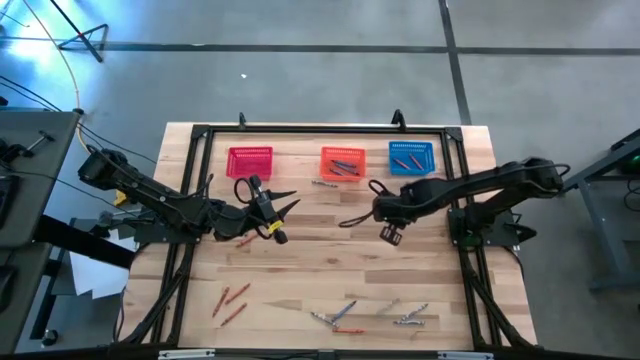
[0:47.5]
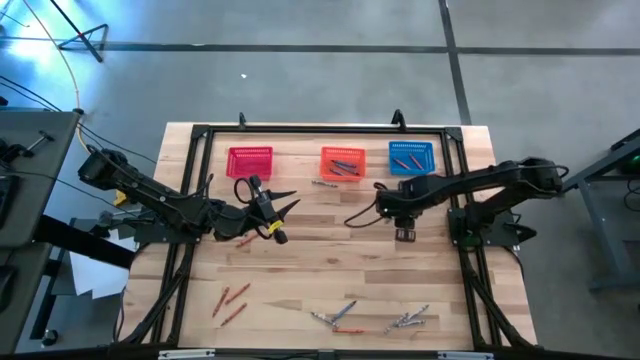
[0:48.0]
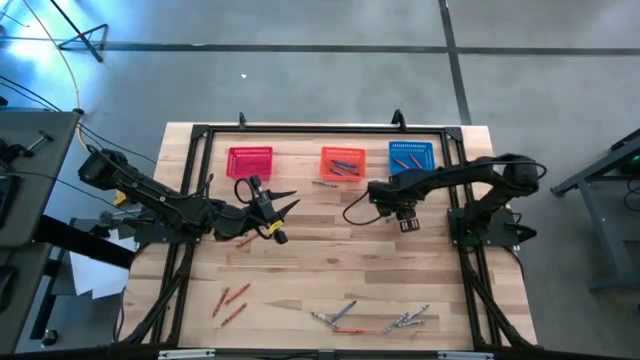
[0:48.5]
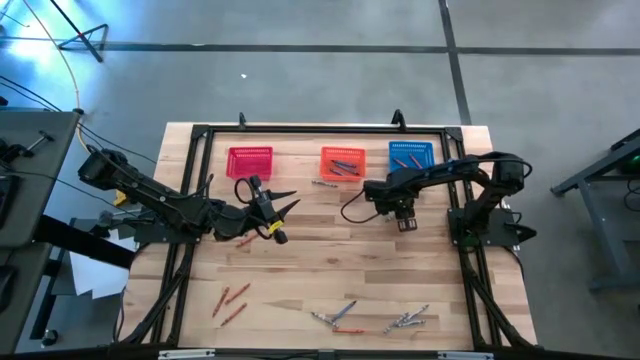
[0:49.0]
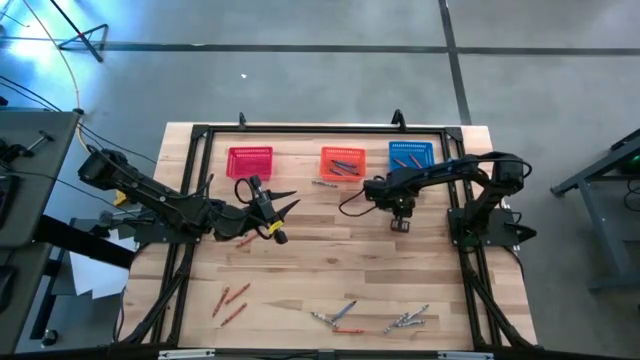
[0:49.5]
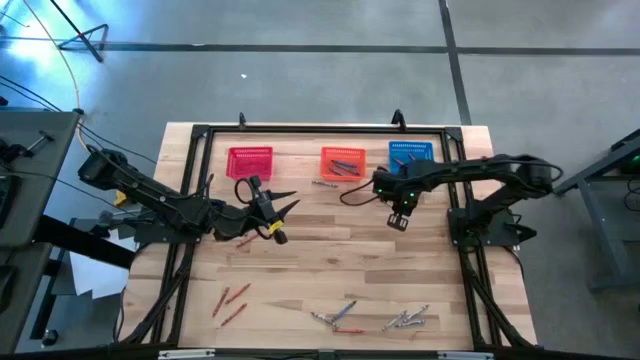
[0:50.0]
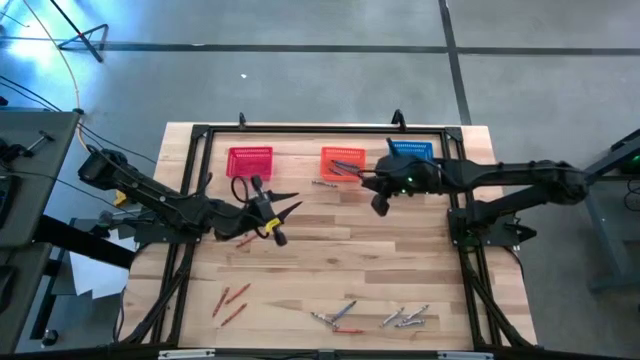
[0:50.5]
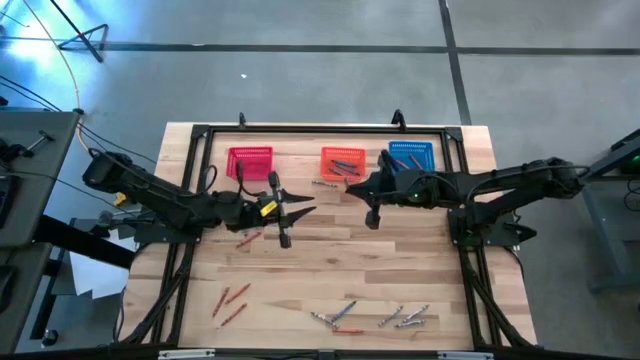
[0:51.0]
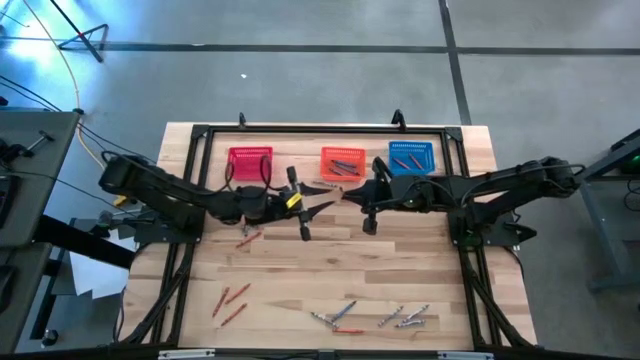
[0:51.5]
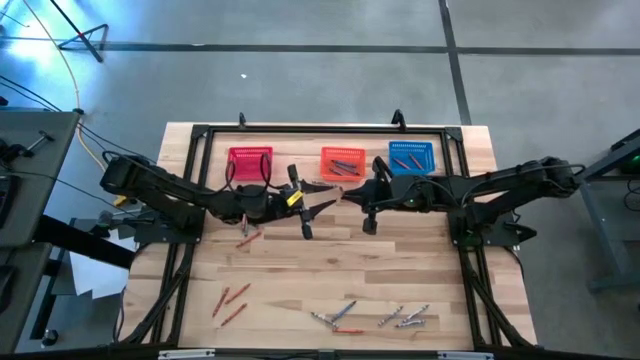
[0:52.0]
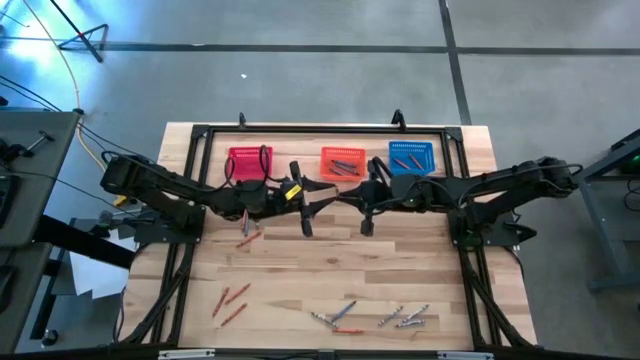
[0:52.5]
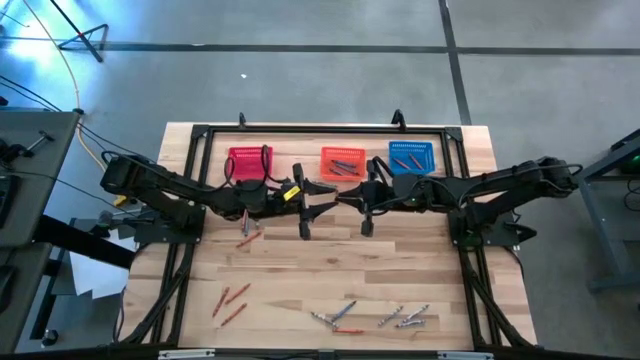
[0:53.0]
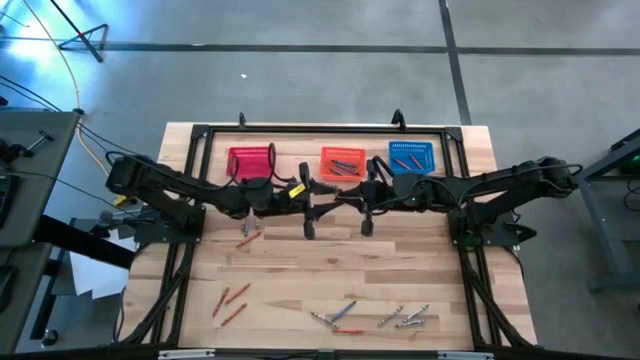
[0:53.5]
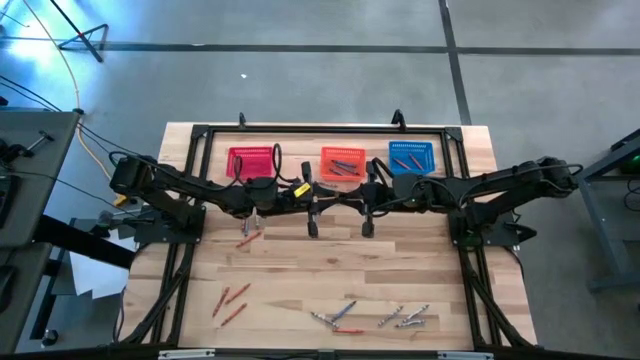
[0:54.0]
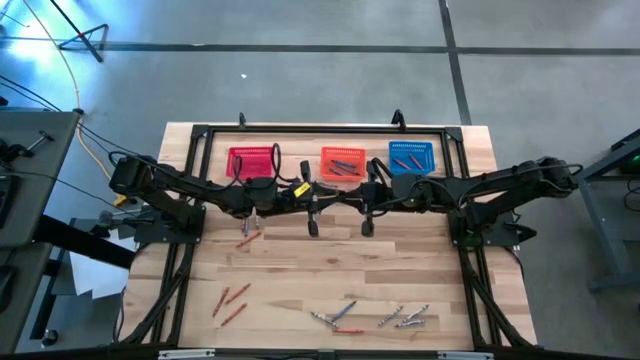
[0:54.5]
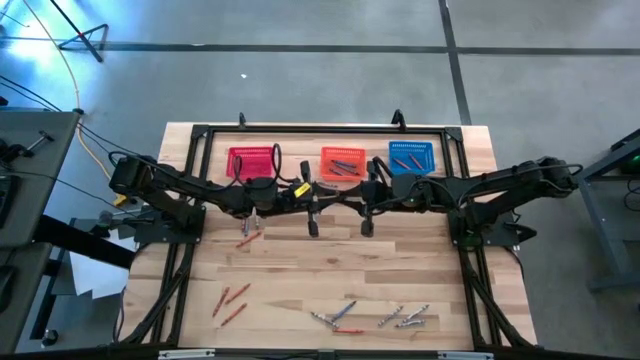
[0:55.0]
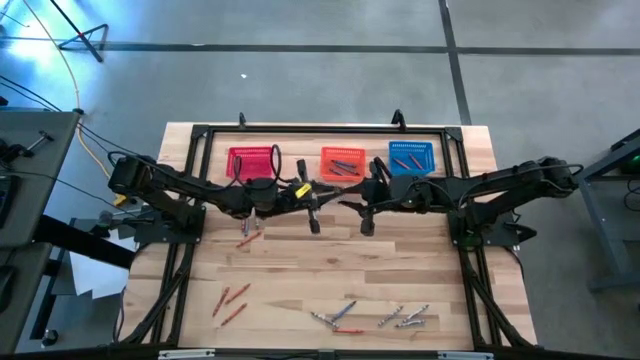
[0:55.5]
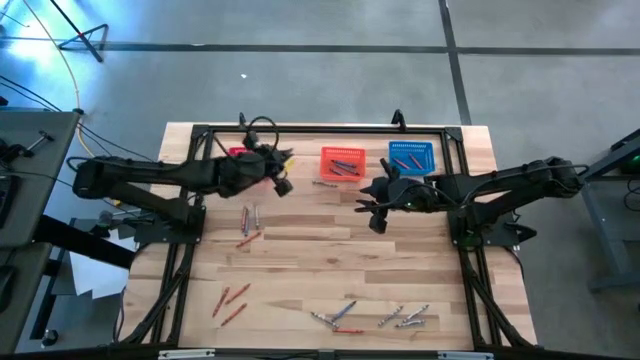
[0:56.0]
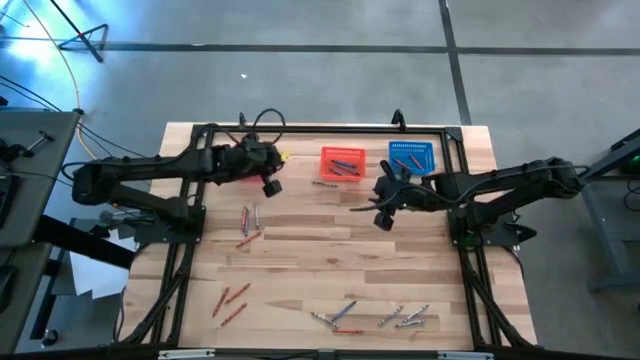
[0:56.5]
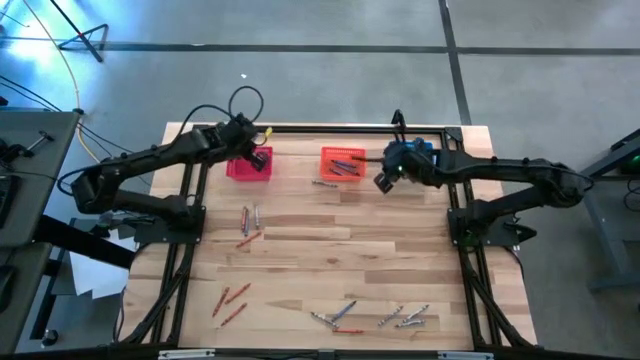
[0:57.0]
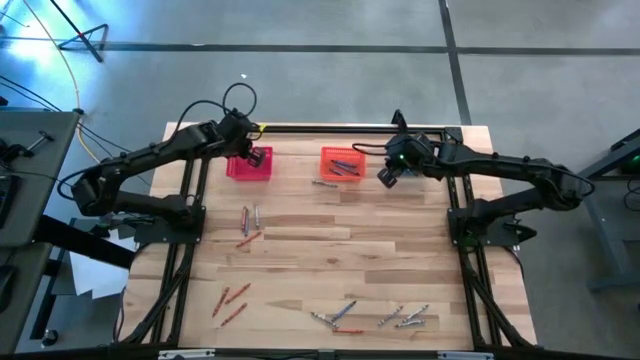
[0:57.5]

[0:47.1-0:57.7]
Task: Sort crayons
Put the gray crayon into the red bin

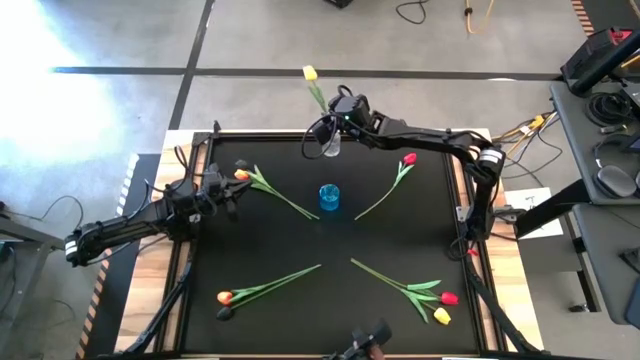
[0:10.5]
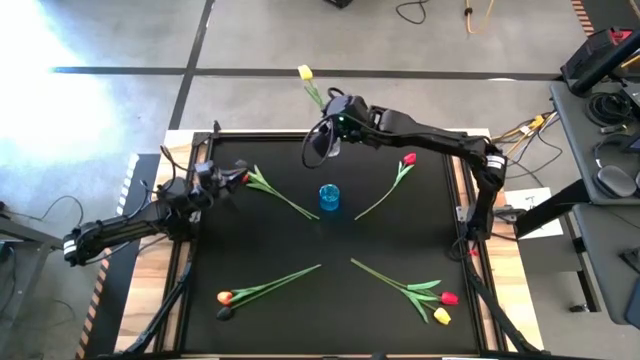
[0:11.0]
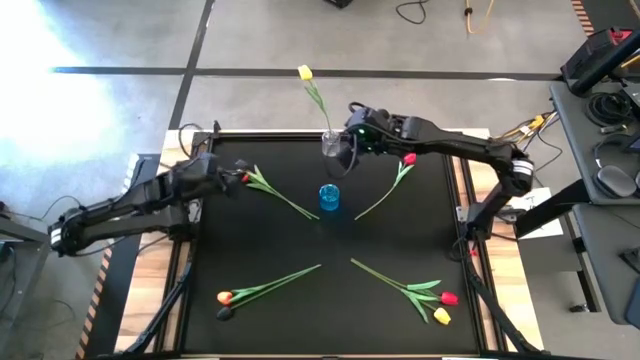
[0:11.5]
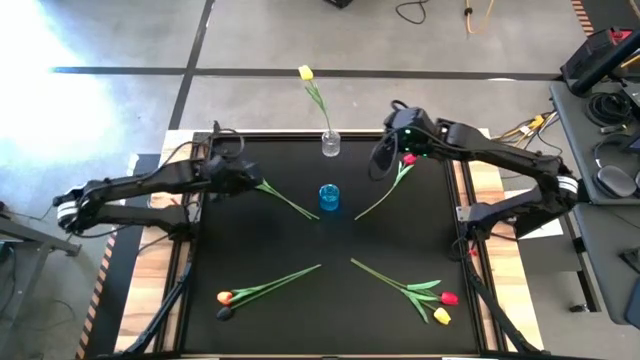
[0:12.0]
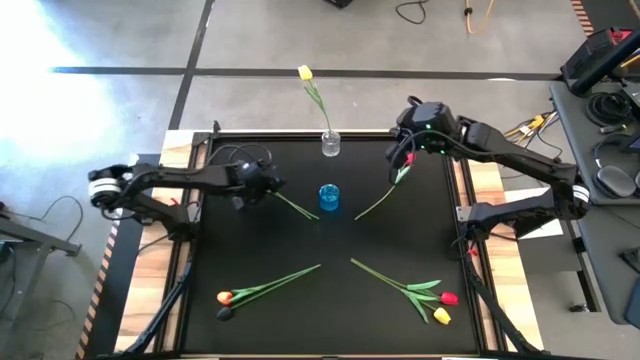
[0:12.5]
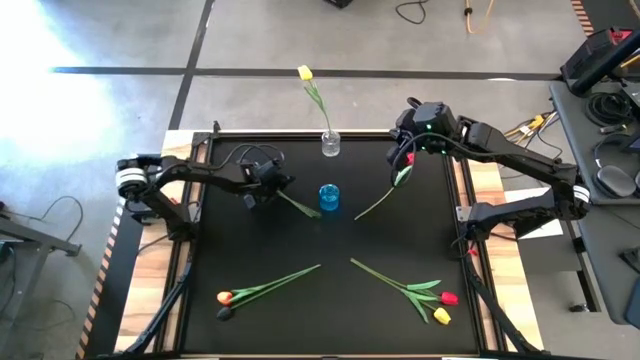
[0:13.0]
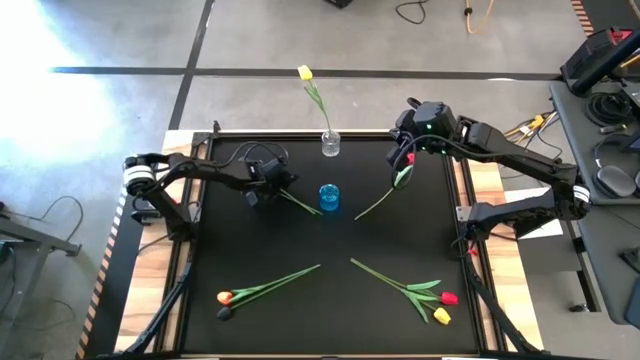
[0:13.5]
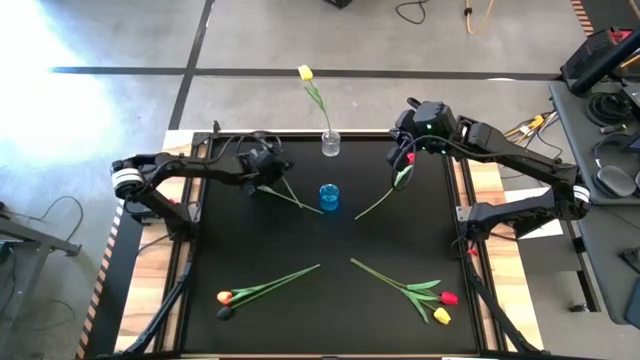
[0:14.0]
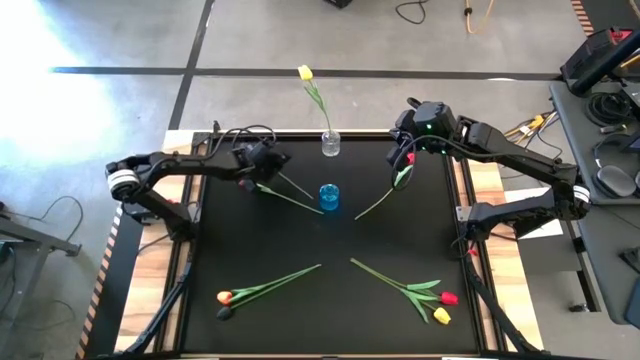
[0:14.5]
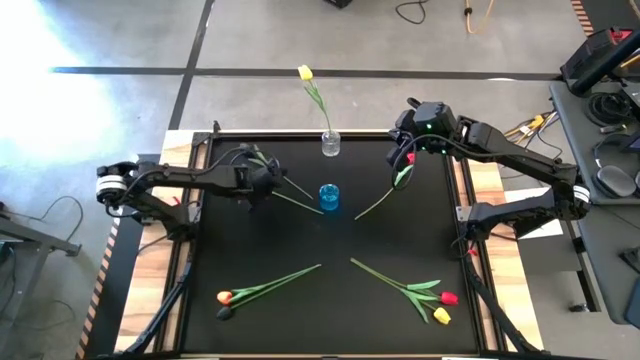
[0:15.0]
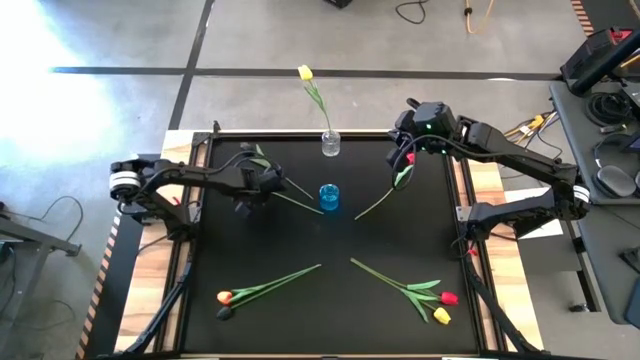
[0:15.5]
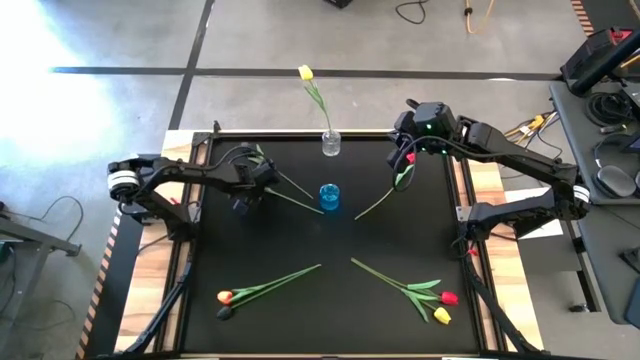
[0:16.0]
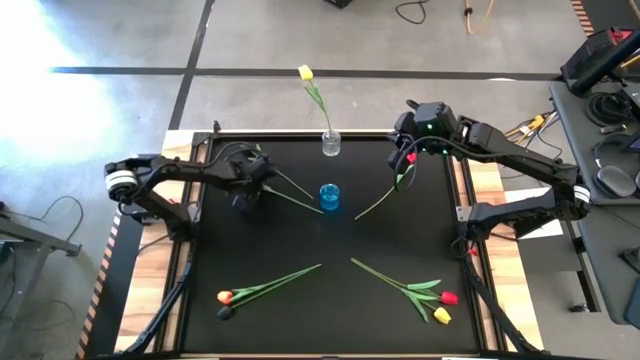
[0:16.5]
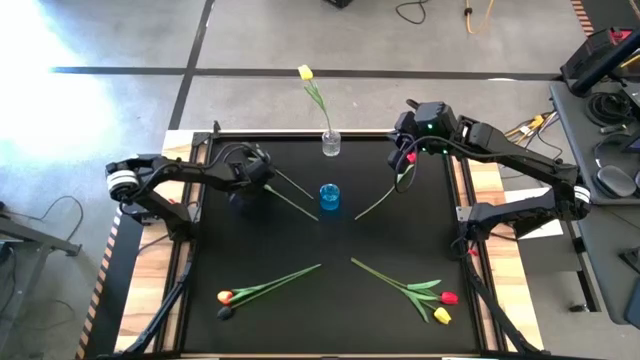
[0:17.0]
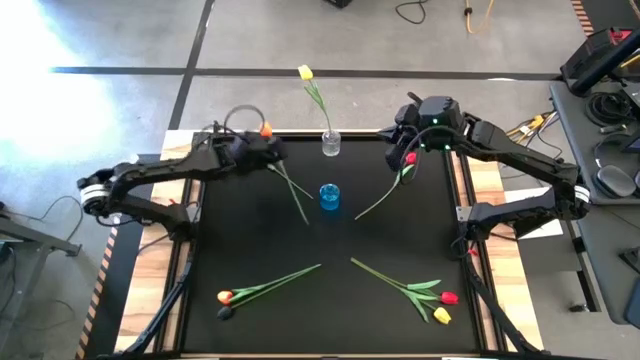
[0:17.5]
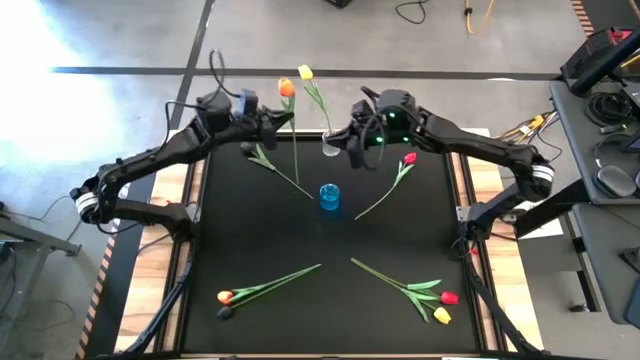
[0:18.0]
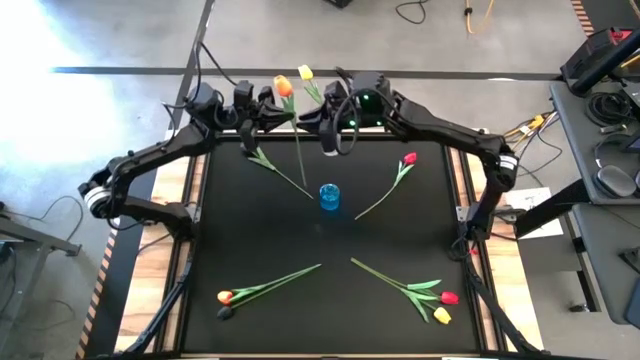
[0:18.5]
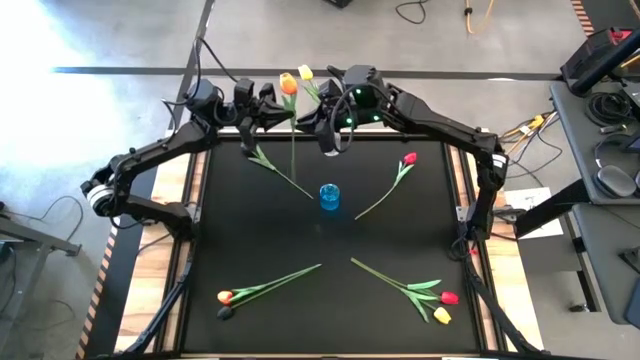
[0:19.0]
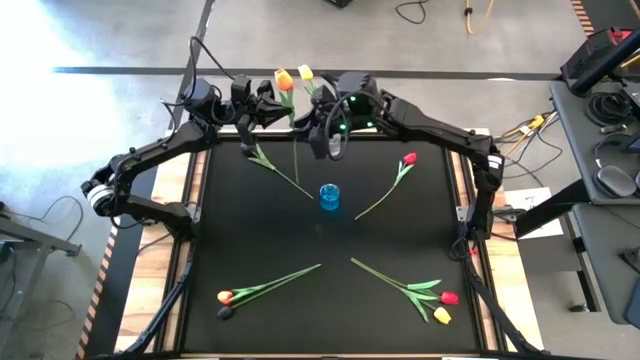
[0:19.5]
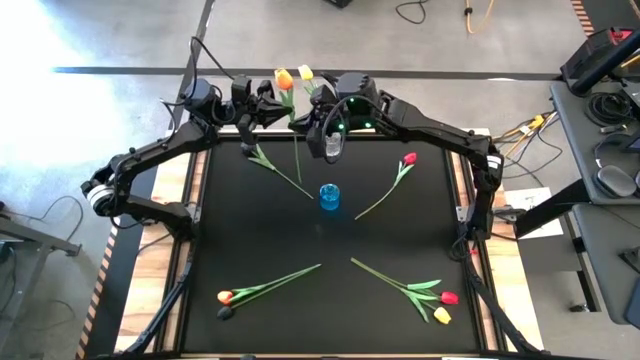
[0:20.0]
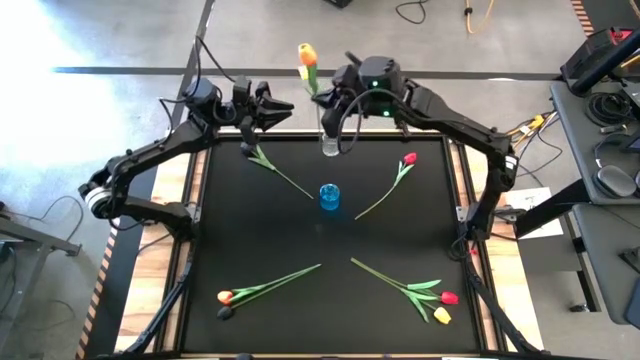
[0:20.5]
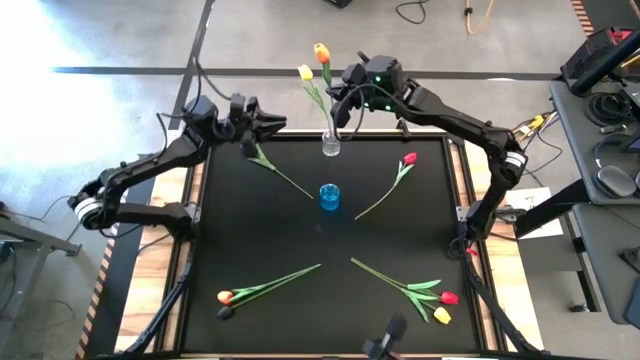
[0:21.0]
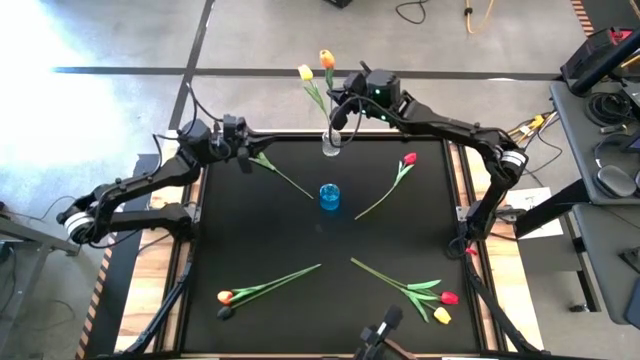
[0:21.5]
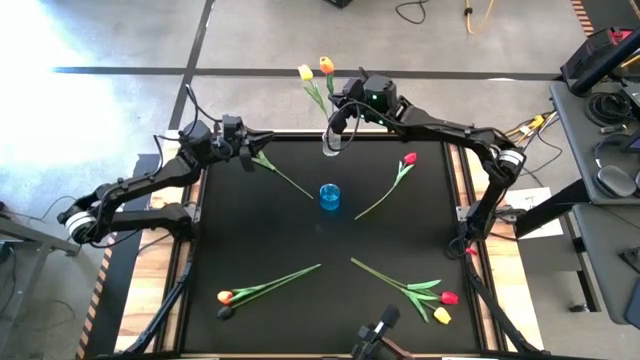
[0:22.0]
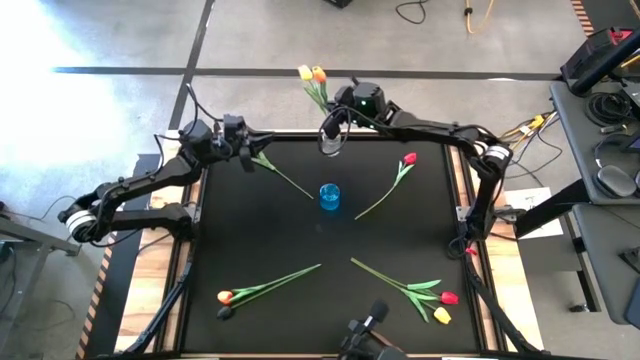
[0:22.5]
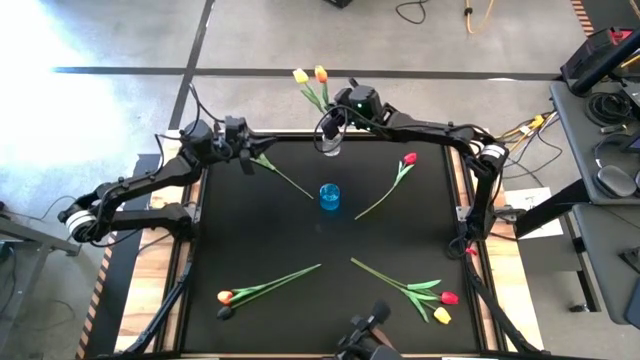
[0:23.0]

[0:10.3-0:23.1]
Task: Sort flowers into vase by color
Put the top orange tulip flower into the transparent vase
